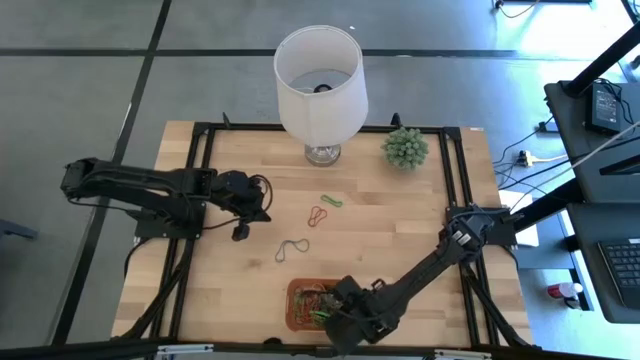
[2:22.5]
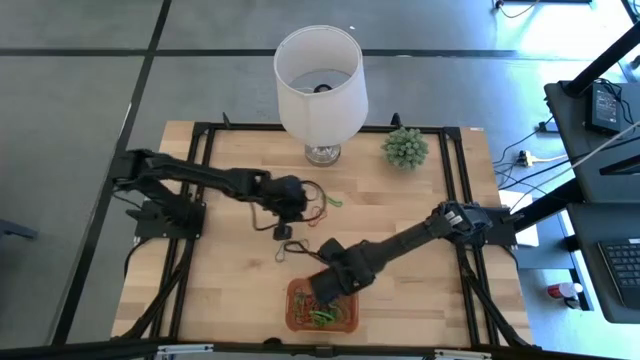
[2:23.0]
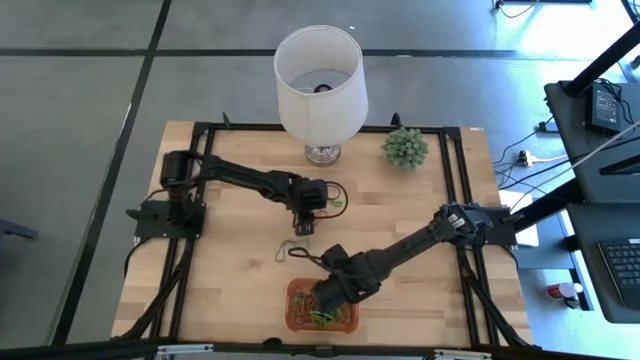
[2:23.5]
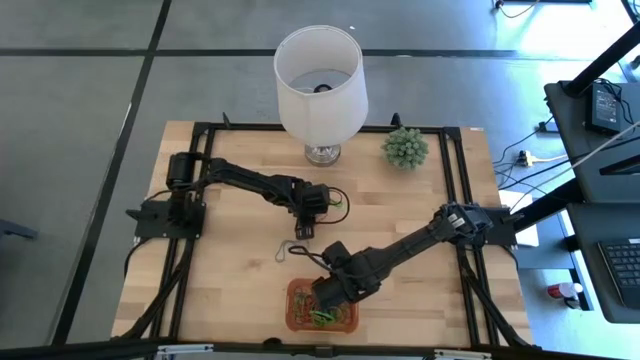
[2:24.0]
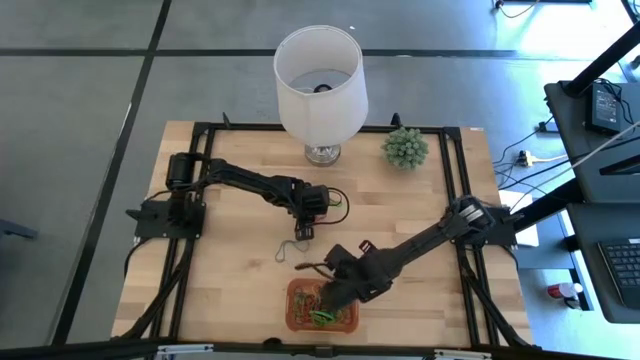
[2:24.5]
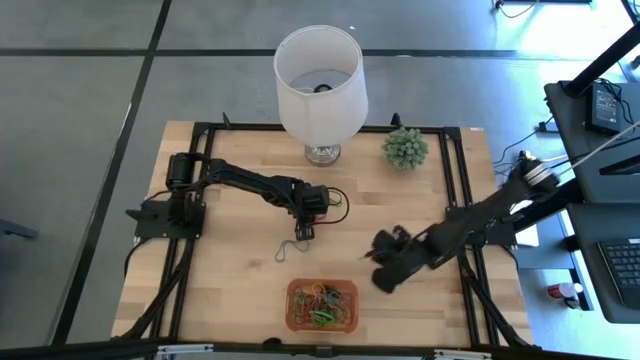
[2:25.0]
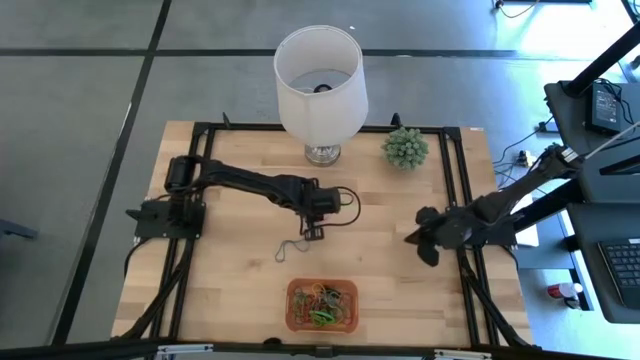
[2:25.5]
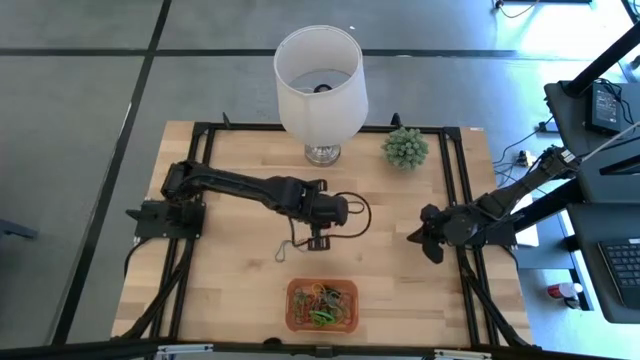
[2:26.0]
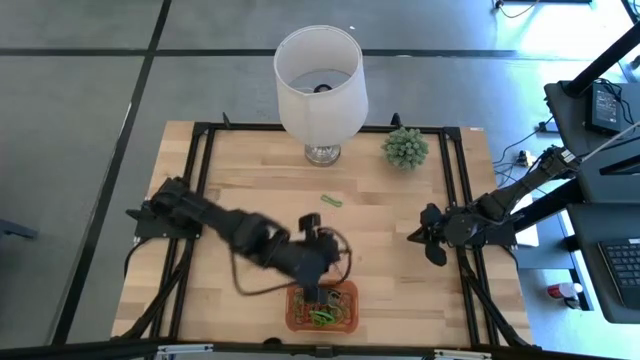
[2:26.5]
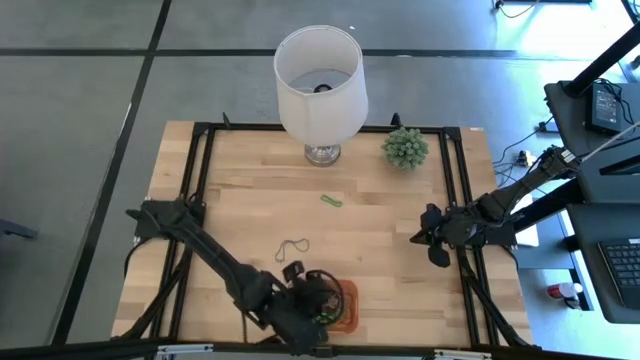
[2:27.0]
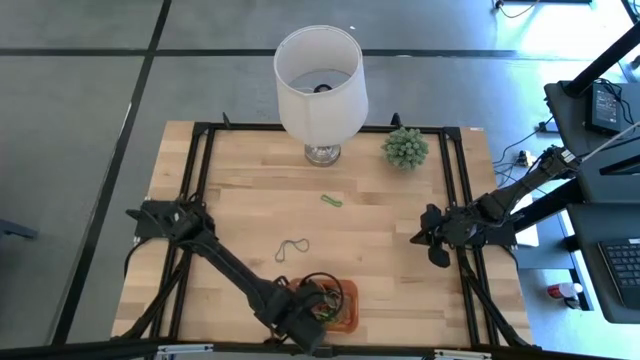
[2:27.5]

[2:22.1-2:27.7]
Task: Pick and place rubber bands into bin
Put the red rubber band into the orange bin

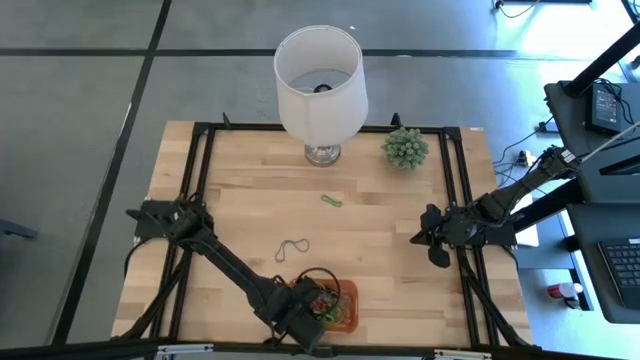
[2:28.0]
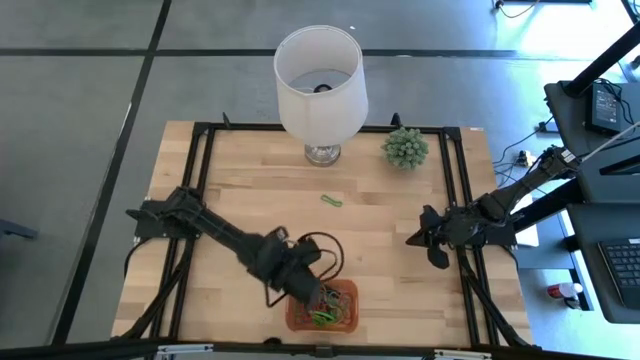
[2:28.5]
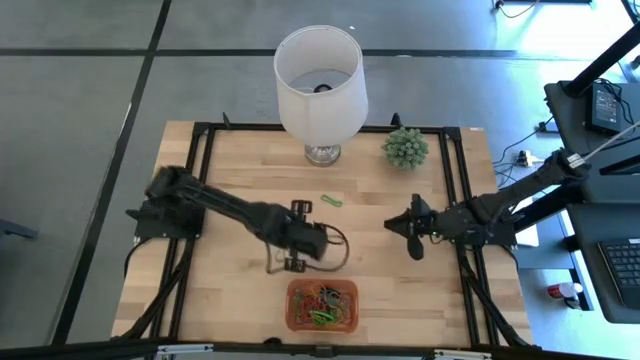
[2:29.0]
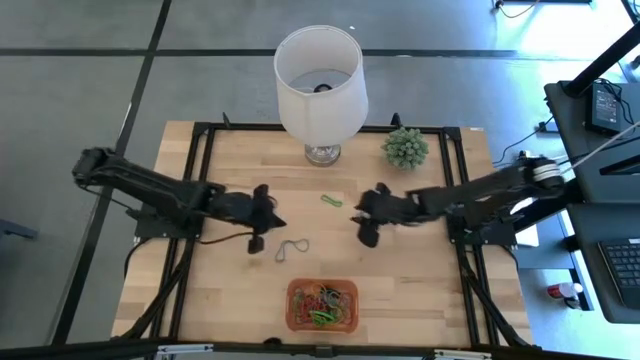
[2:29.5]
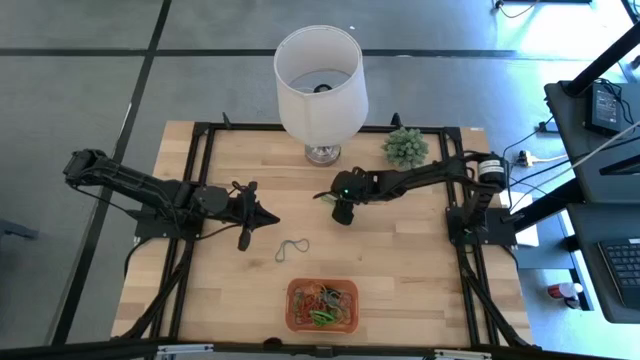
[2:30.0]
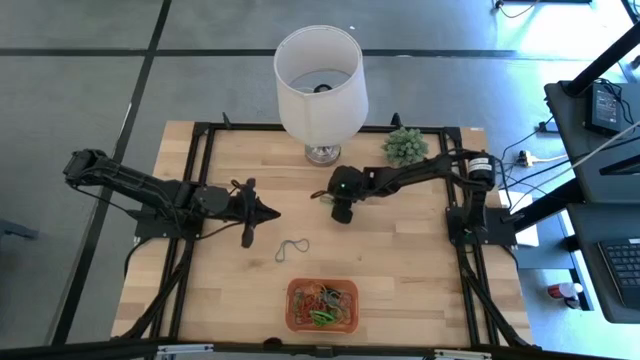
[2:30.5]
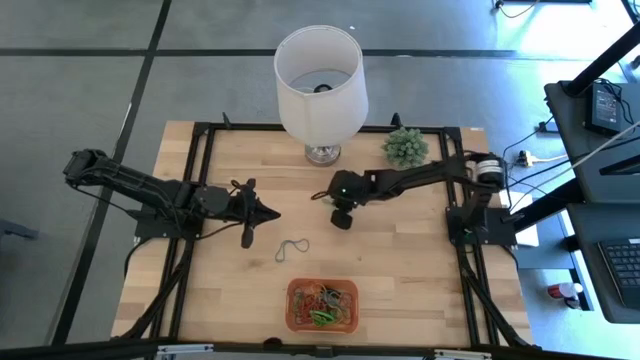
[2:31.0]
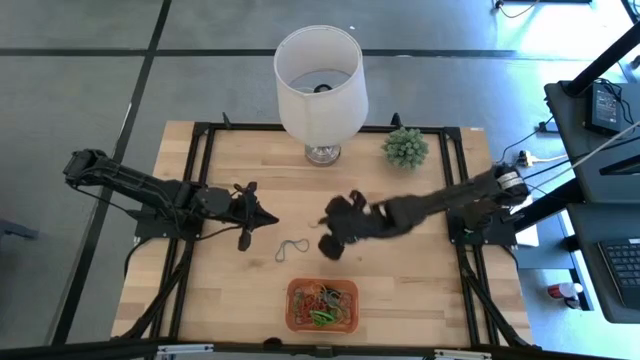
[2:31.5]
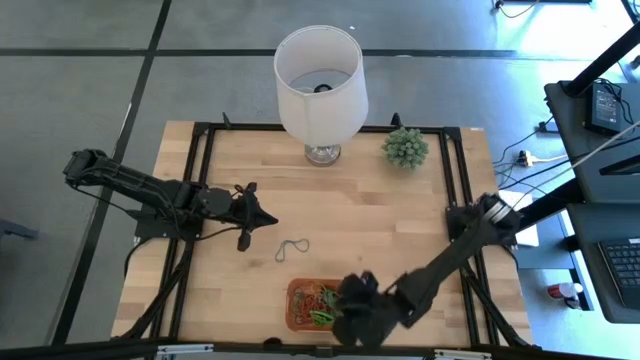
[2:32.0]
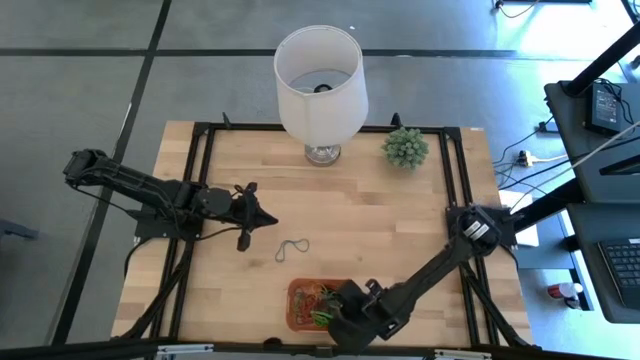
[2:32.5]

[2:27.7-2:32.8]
Put the green rubber band into the orange bin

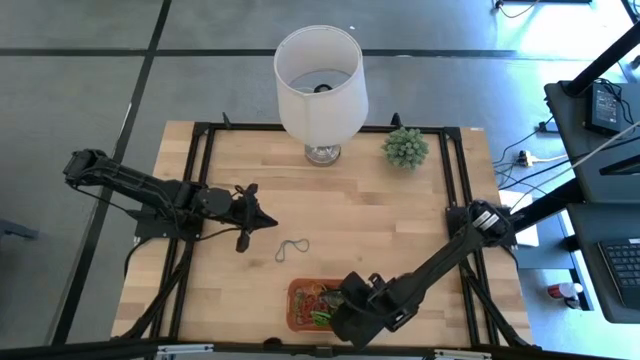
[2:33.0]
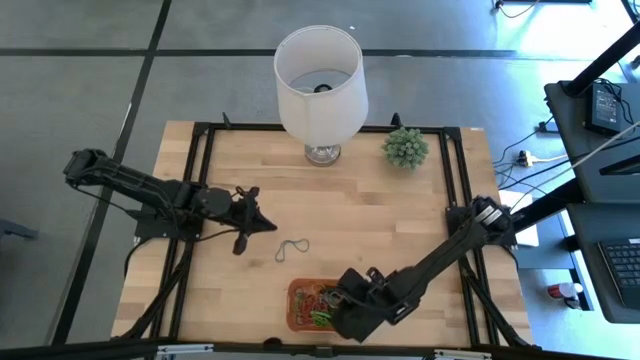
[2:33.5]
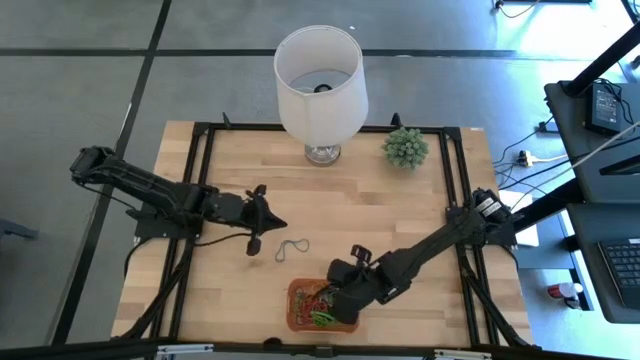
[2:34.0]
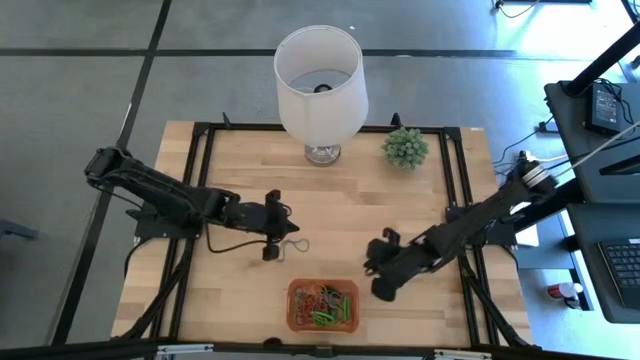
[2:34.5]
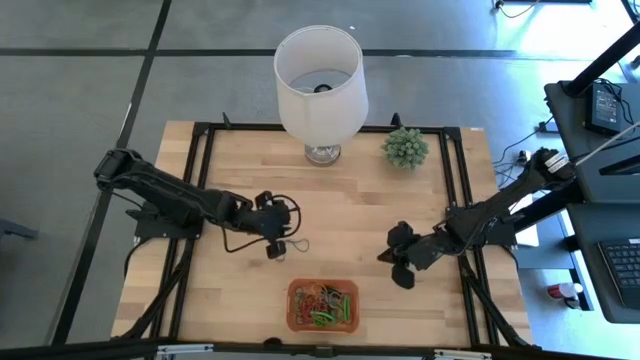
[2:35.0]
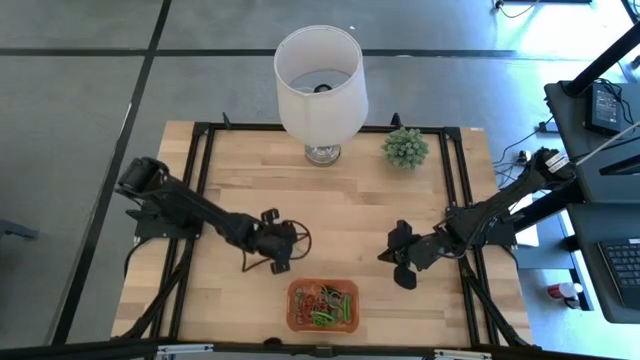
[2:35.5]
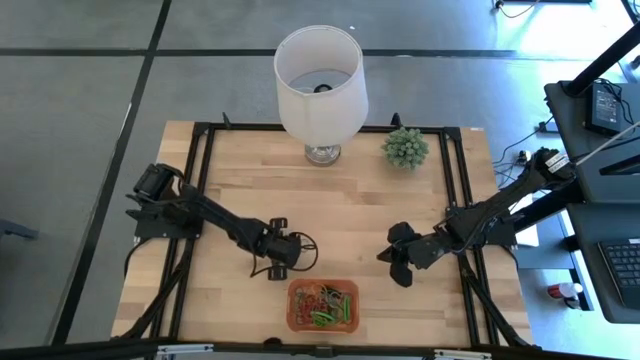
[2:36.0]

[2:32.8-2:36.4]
Put the blue rubber band into the orange bin

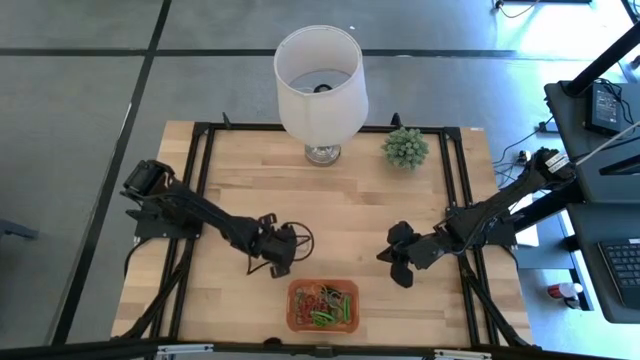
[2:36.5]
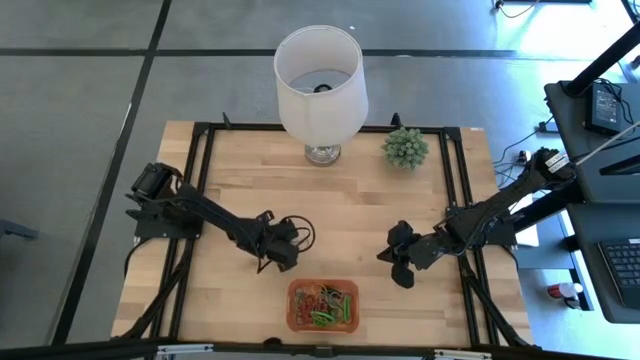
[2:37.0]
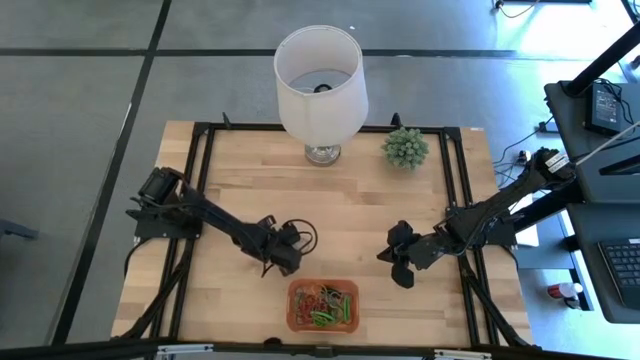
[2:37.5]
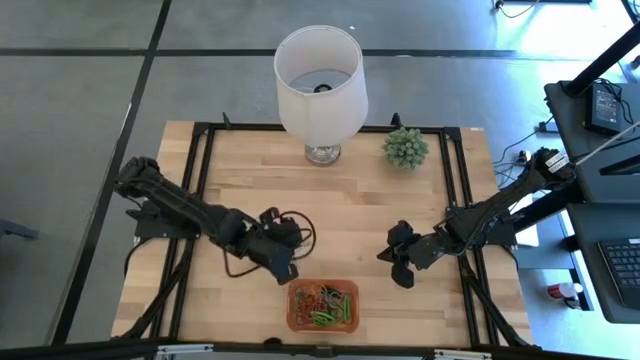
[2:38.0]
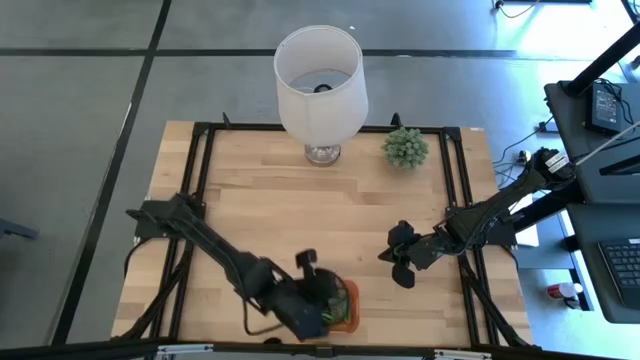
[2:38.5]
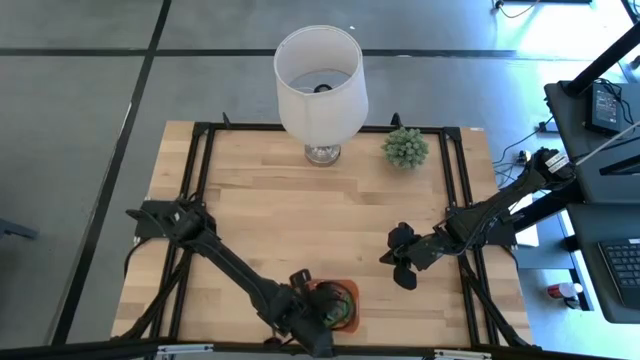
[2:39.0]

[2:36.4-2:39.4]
Put the blue rubber band into the orange bin

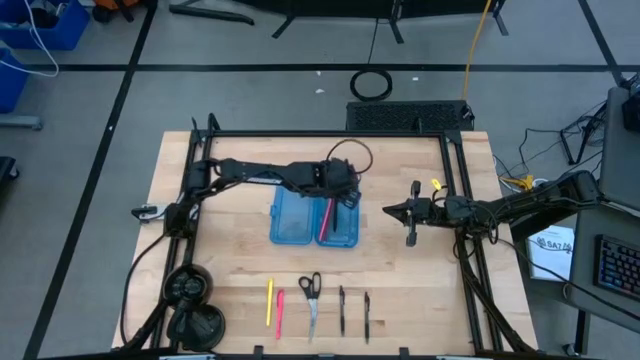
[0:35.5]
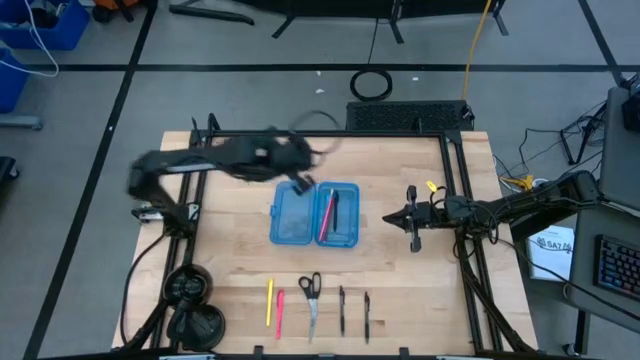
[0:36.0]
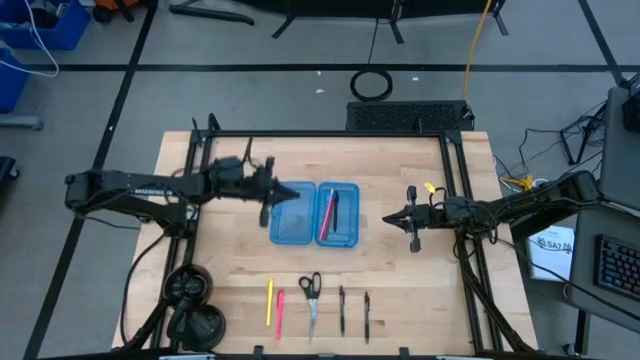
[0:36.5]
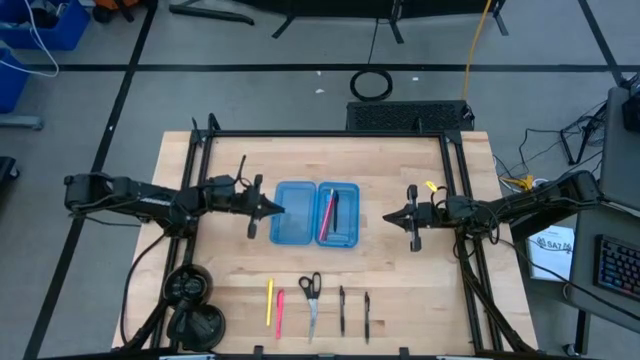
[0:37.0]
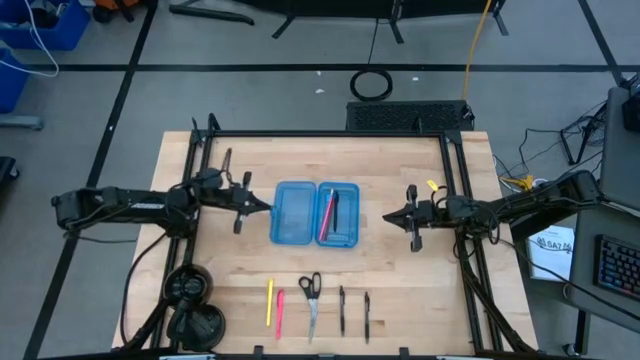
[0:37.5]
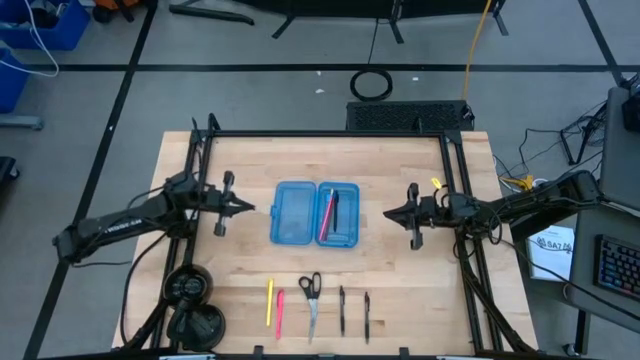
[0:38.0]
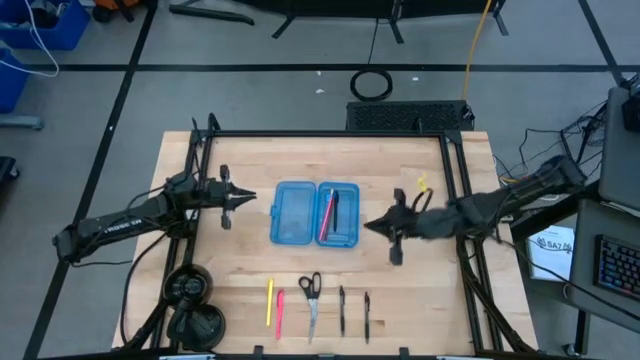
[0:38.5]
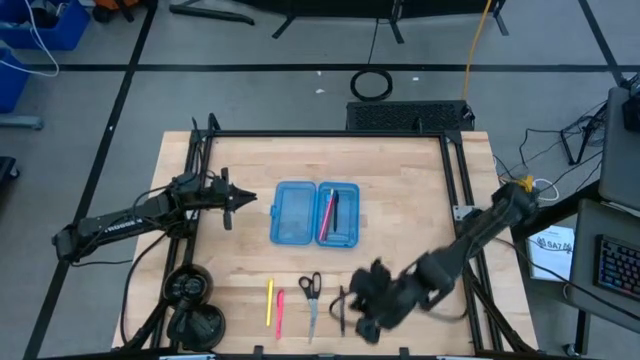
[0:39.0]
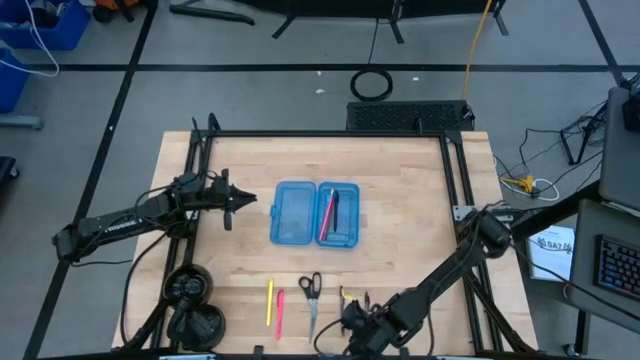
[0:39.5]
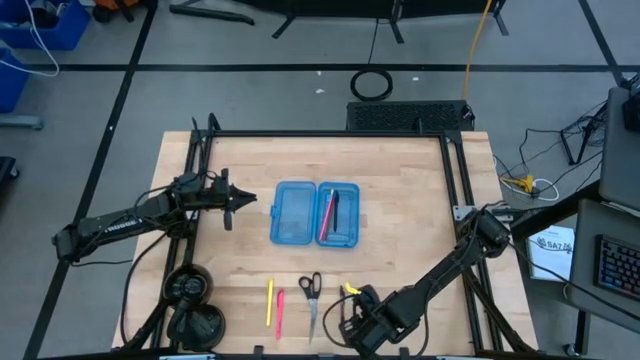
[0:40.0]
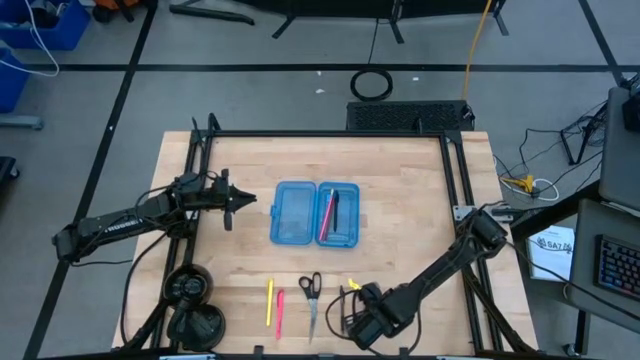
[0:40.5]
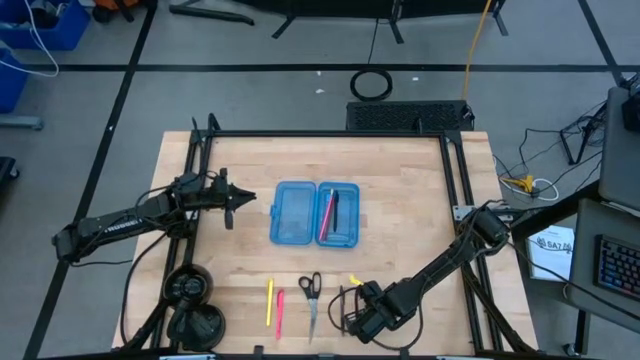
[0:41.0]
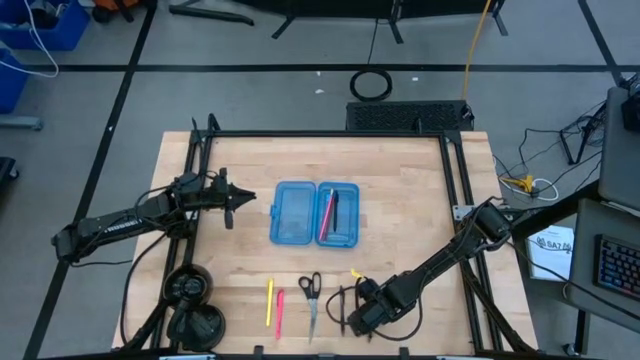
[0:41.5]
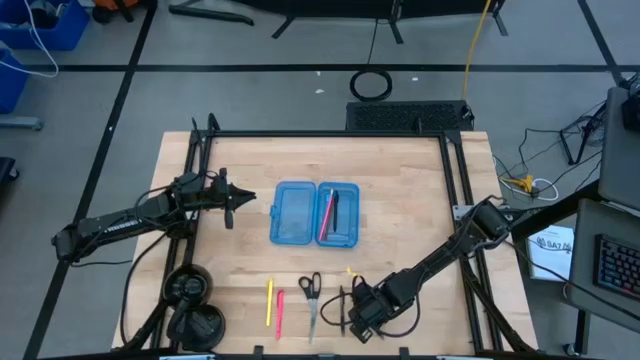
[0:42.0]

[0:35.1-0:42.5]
Task: Pick & place school supplies into a supply box
Put the right black pen into the blue supply box
